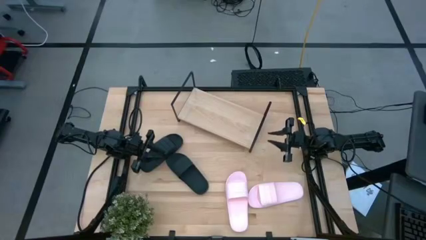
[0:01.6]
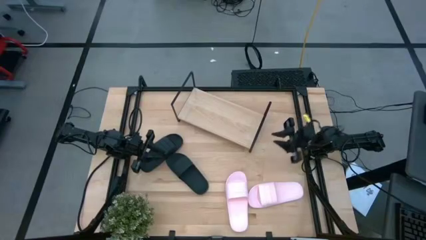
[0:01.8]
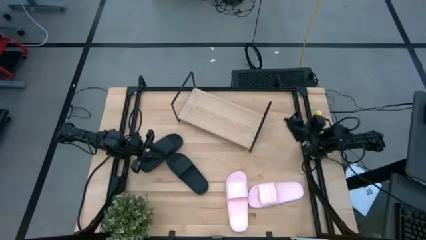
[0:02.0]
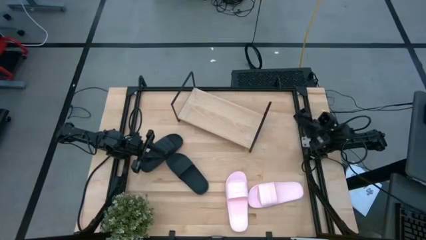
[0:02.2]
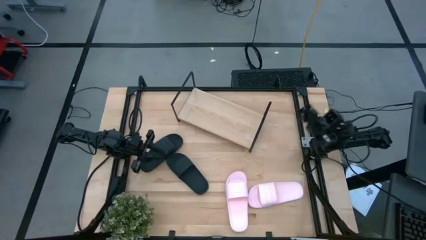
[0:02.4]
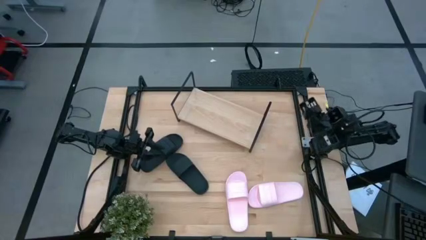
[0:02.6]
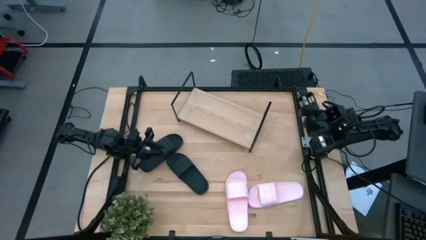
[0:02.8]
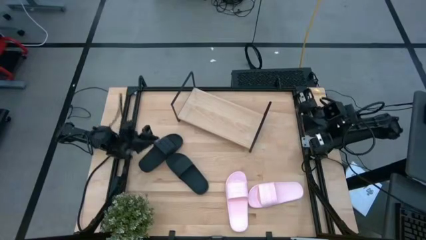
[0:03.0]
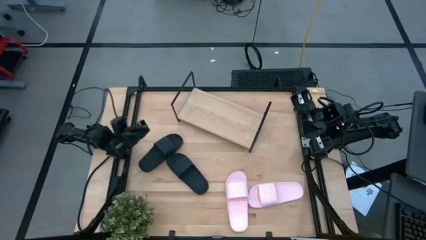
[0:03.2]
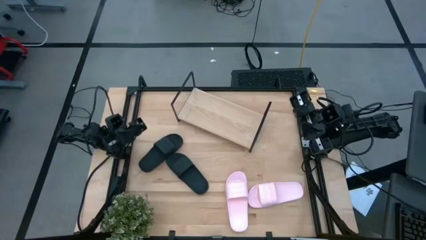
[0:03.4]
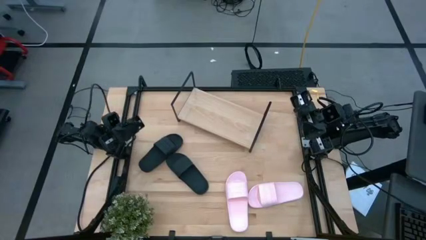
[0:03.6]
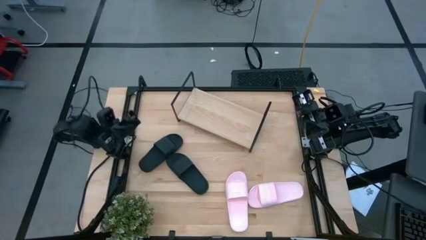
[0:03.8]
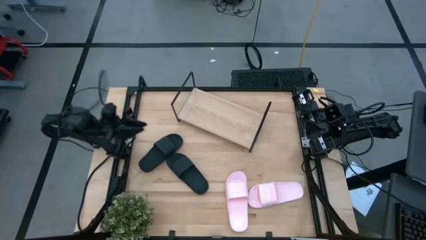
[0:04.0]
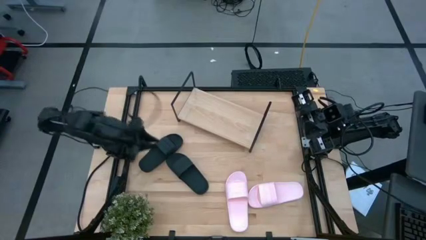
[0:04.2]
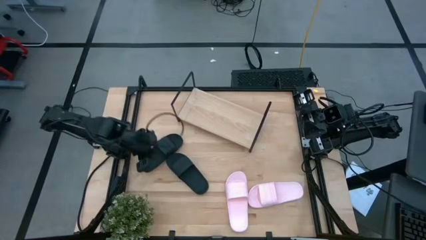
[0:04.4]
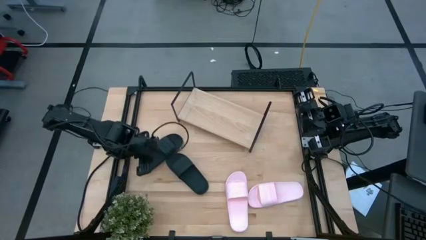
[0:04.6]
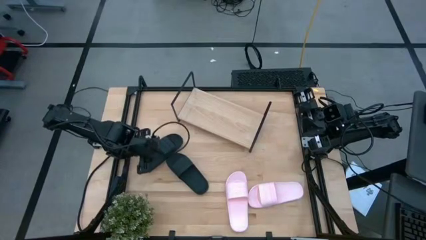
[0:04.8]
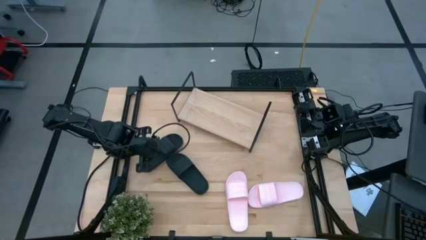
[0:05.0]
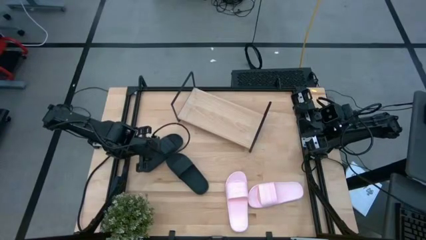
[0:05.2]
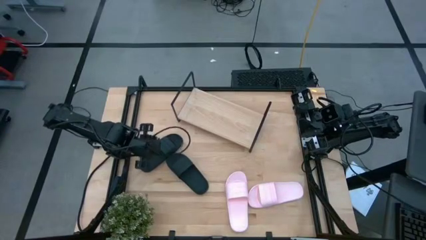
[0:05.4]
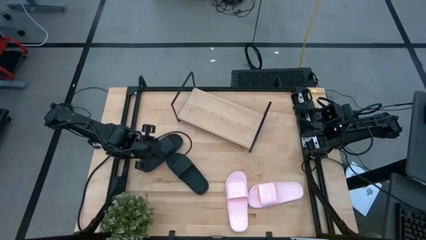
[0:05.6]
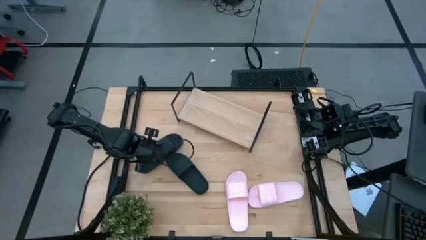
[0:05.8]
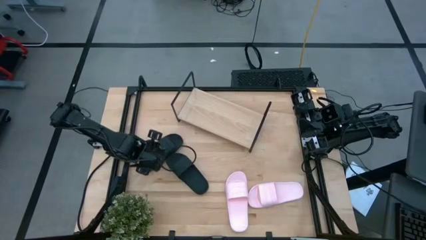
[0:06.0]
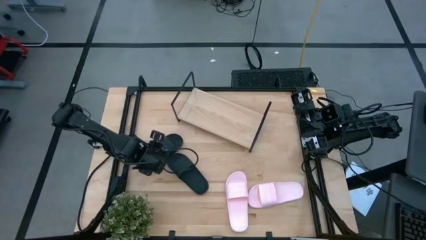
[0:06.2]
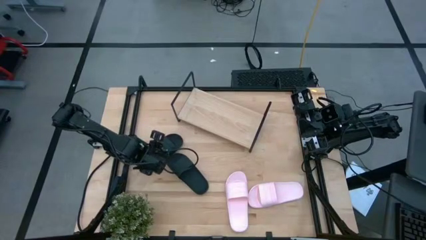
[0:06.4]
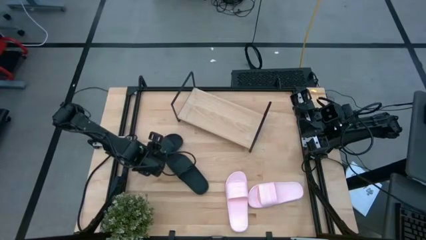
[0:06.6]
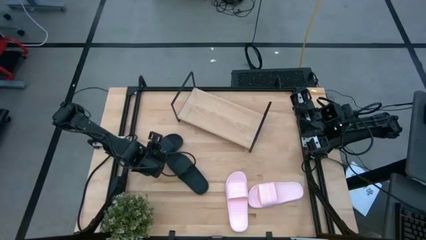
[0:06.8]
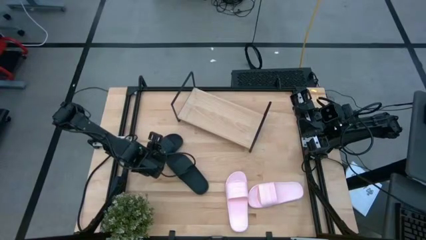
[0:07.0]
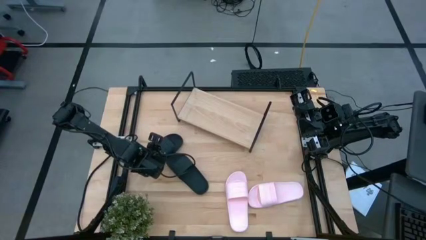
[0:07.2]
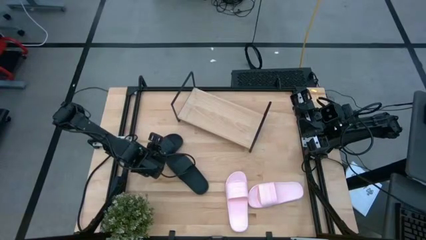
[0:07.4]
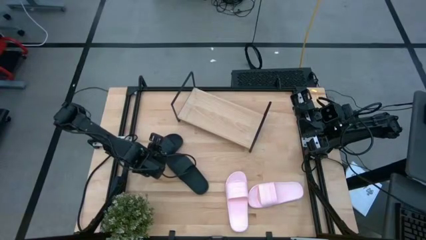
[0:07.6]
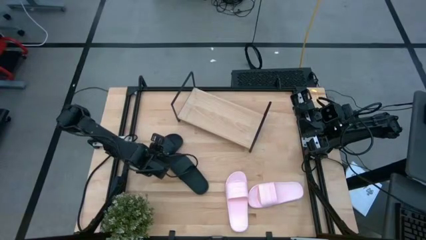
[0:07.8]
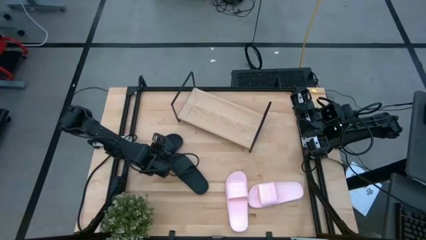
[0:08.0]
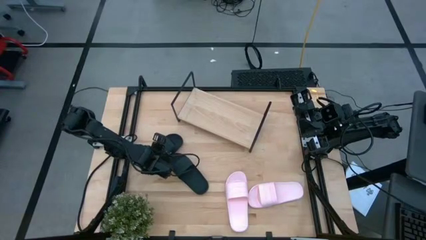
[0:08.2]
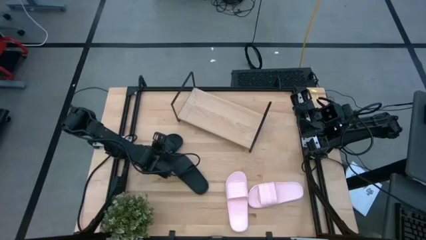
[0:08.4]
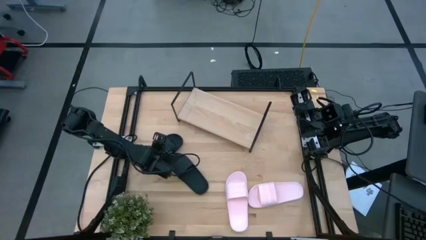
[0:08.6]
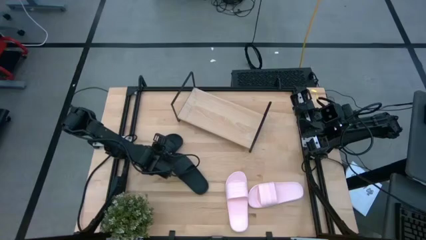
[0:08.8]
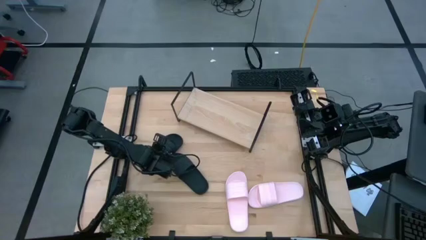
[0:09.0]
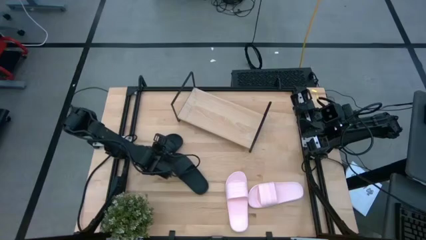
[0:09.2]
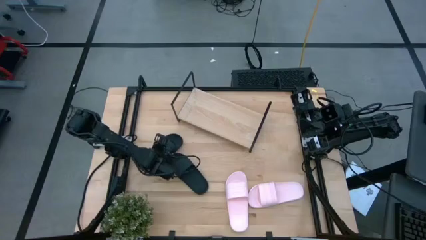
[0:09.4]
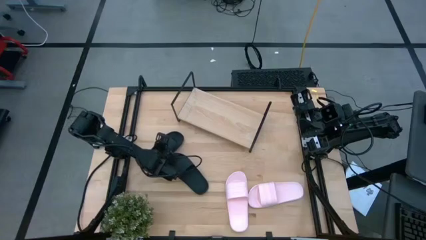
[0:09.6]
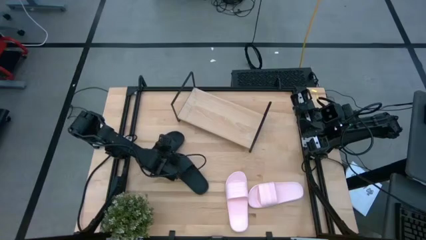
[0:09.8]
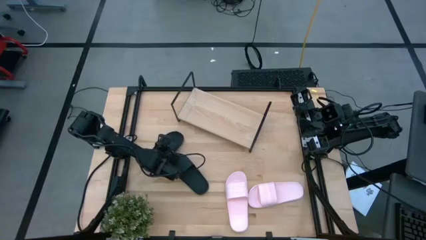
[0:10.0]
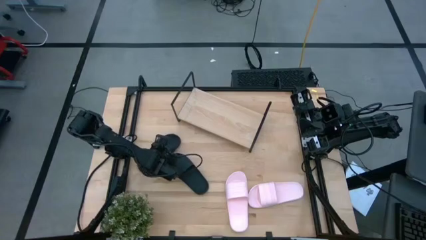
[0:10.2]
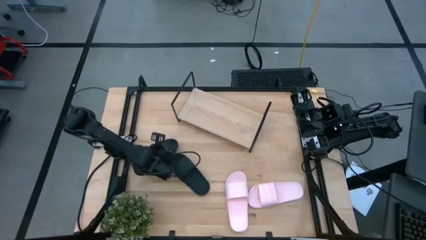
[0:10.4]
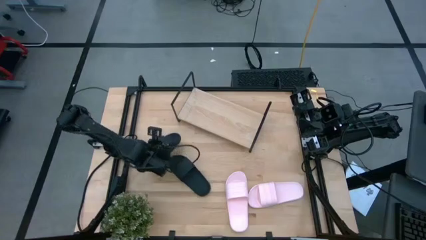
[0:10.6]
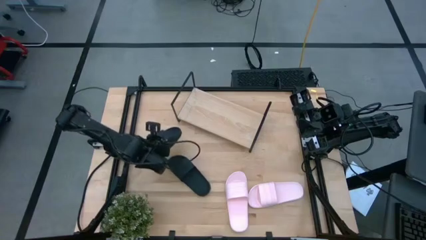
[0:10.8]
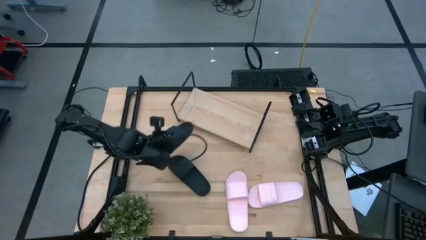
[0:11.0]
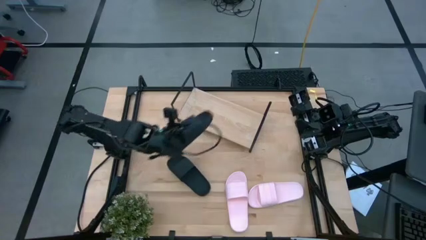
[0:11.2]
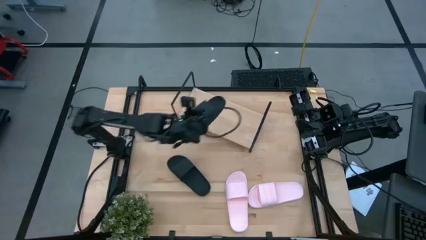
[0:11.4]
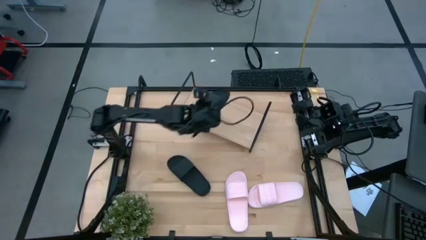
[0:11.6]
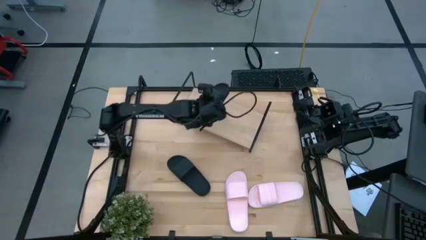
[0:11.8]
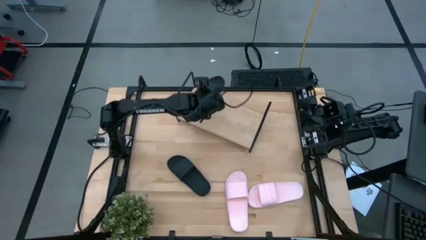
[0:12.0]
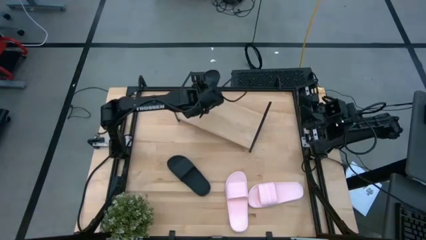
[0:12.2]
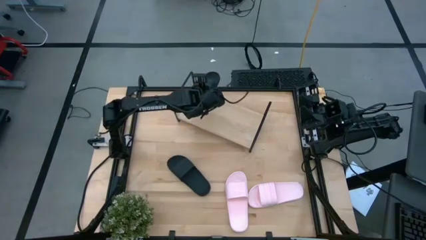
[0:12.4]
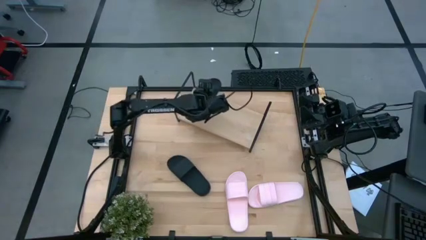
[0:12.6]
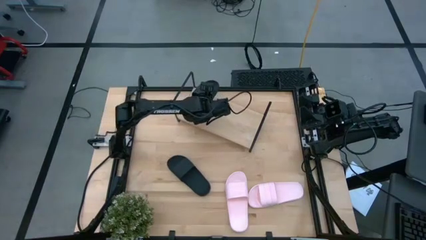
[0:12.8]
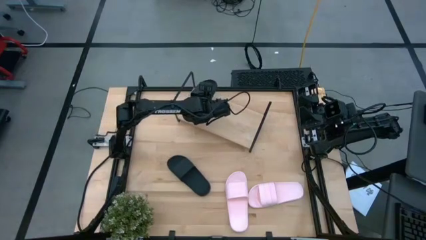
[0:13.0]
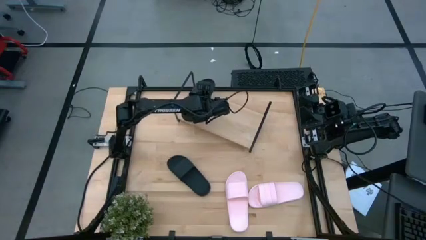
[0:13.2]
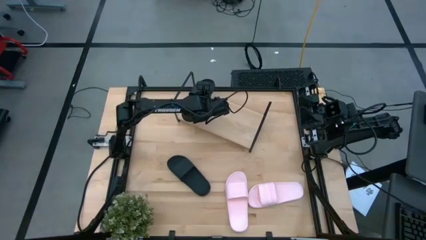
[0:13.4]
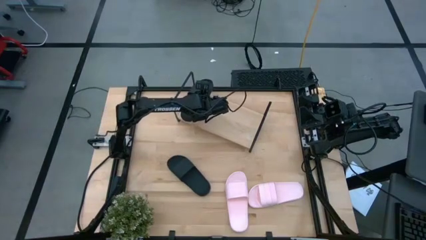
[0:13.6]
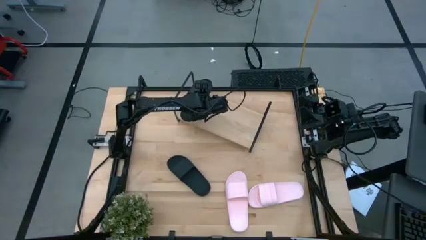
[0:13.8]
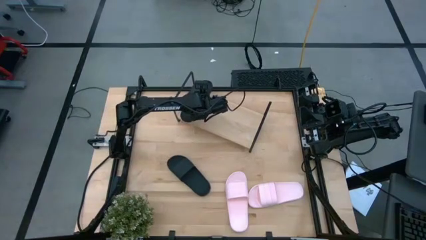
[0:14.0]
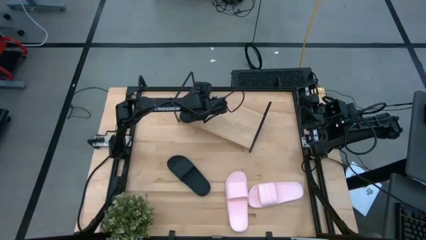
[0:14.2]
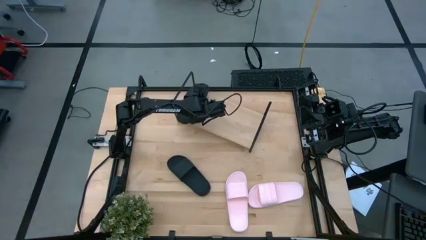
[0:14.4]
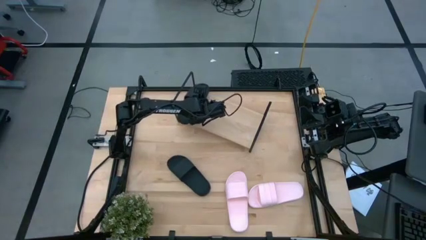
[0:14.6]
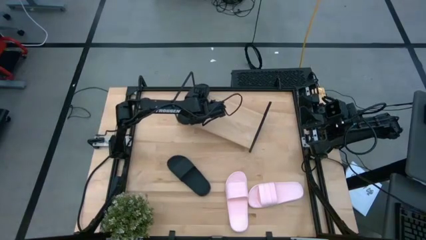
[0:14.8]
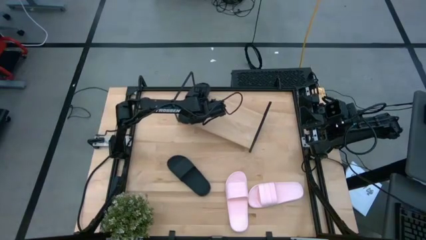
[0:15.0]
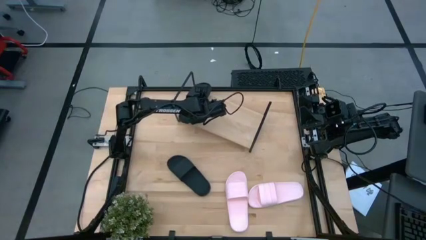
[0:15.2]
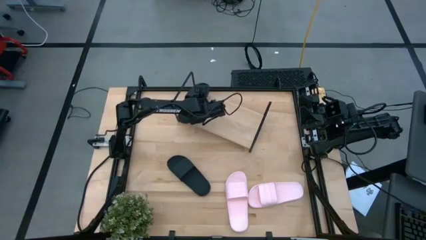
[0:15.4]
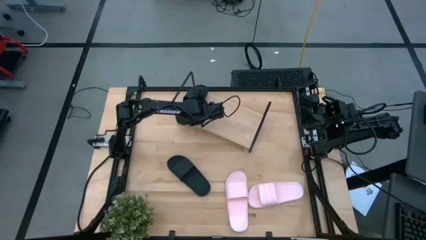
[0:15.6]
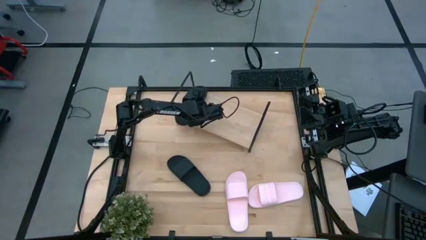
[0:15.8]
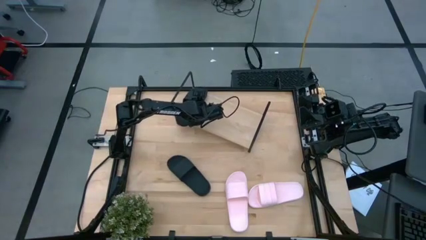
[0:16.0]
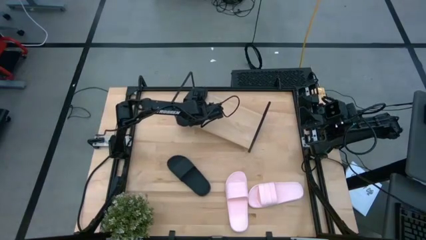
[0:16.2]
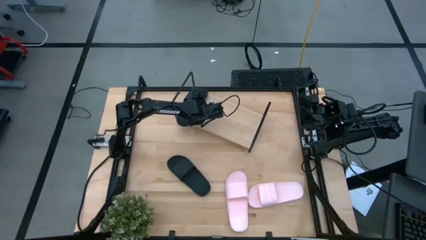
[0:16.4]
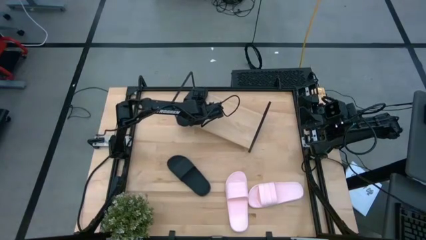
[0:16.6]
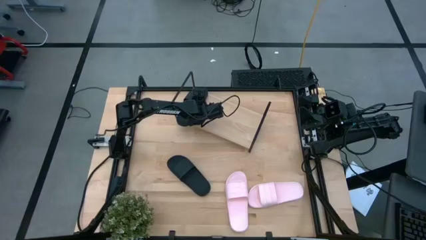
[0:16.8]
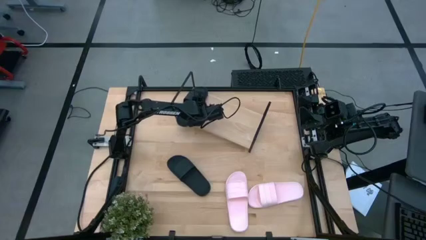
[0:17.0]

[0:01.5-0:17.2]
Task: Pick and place slides into the shelf
Put the top black slides on the shelf
